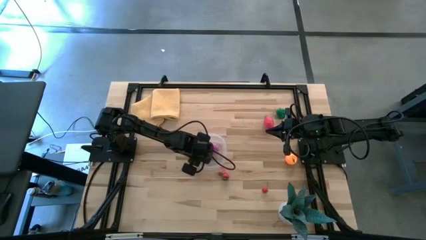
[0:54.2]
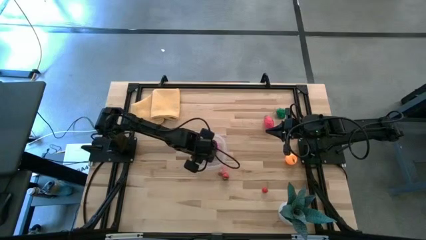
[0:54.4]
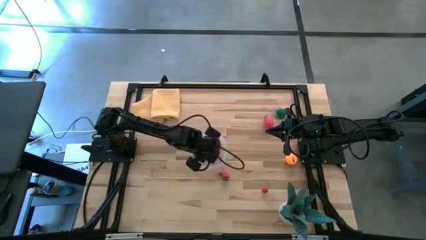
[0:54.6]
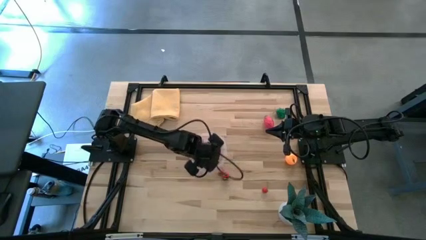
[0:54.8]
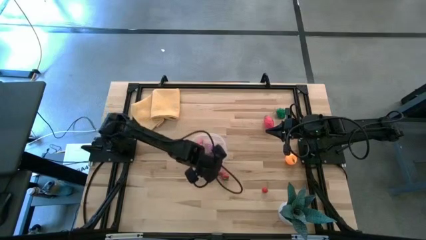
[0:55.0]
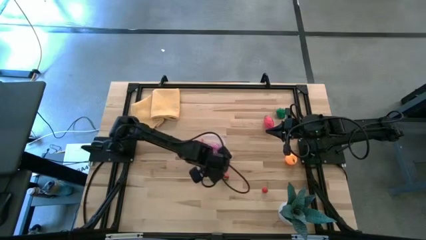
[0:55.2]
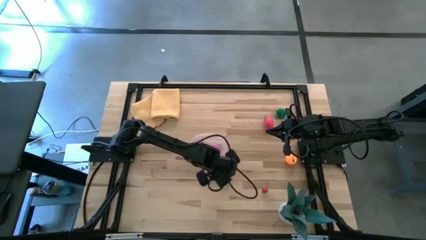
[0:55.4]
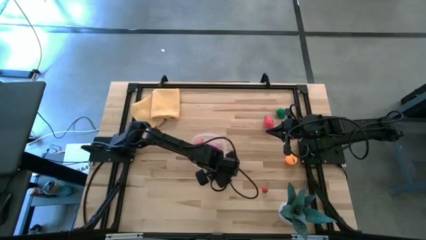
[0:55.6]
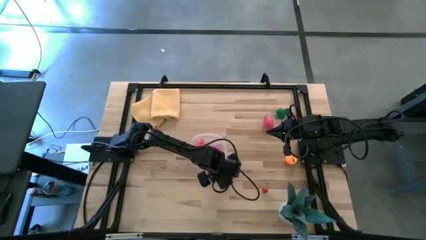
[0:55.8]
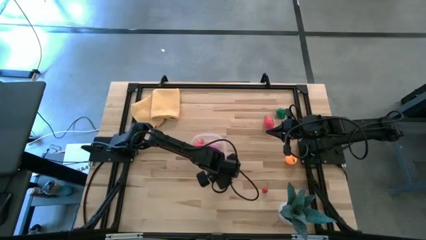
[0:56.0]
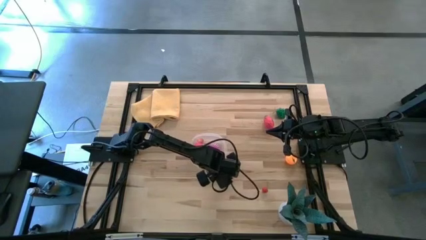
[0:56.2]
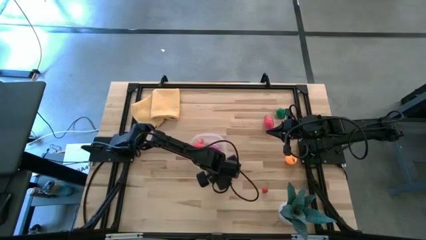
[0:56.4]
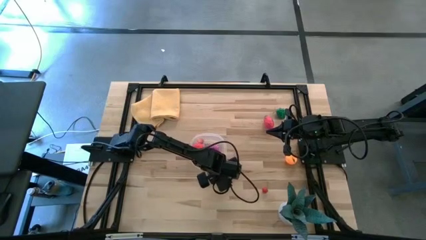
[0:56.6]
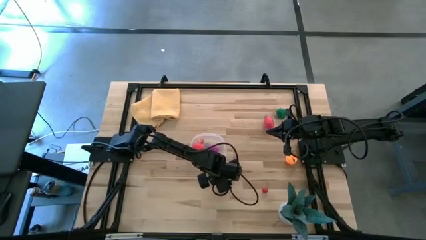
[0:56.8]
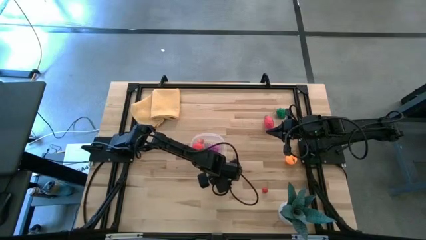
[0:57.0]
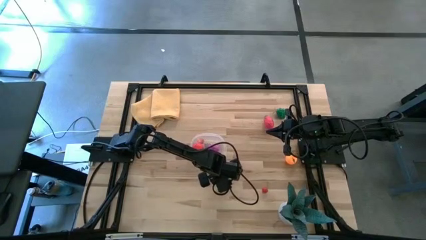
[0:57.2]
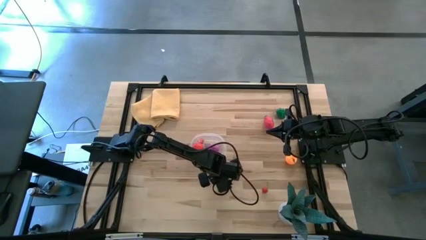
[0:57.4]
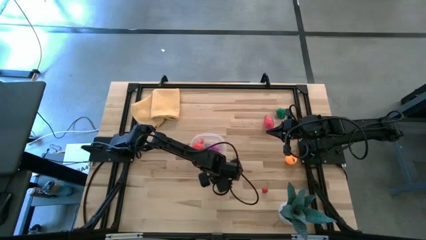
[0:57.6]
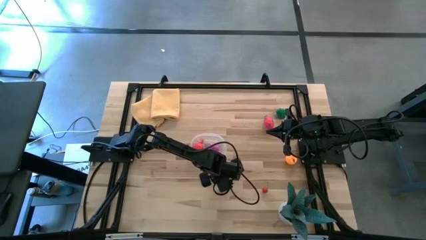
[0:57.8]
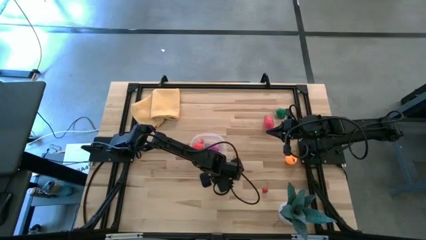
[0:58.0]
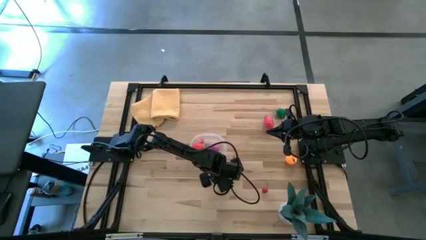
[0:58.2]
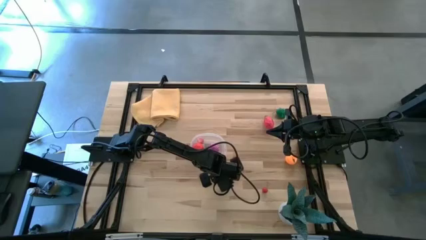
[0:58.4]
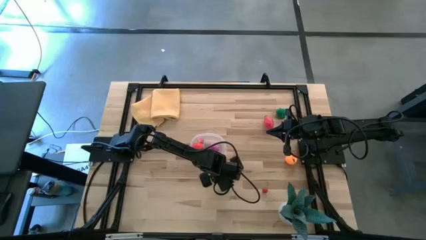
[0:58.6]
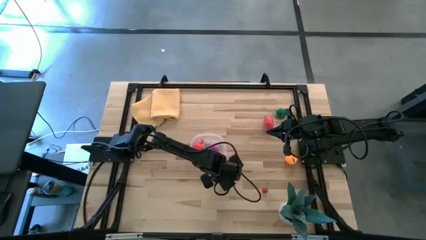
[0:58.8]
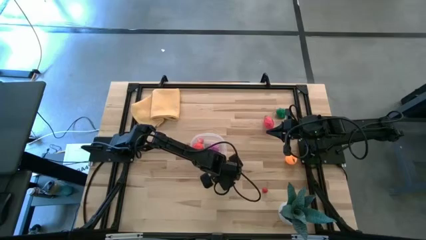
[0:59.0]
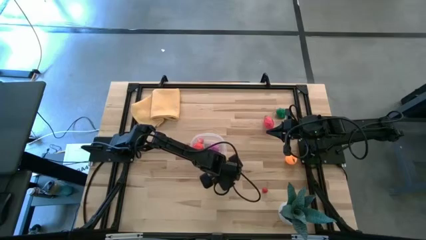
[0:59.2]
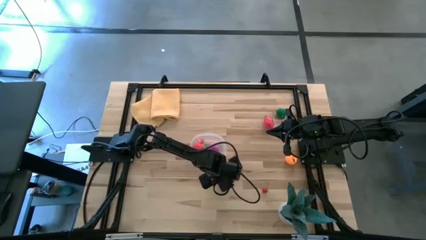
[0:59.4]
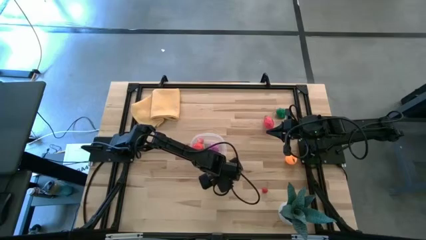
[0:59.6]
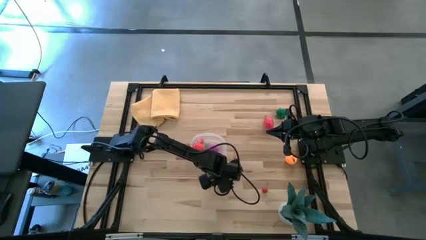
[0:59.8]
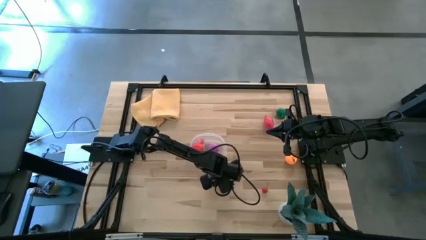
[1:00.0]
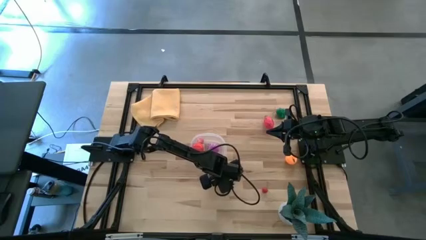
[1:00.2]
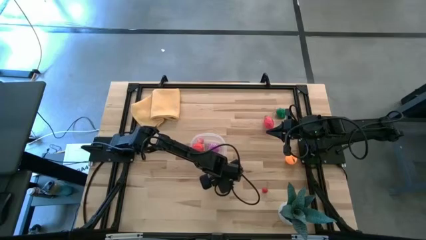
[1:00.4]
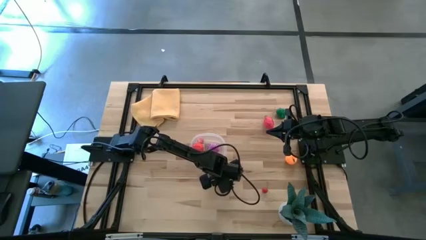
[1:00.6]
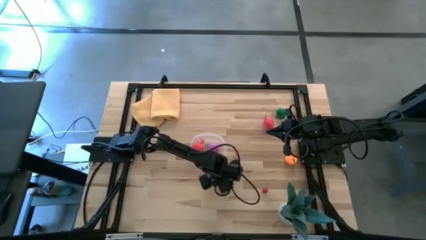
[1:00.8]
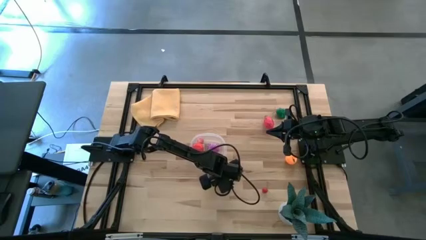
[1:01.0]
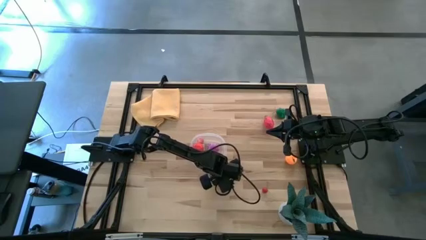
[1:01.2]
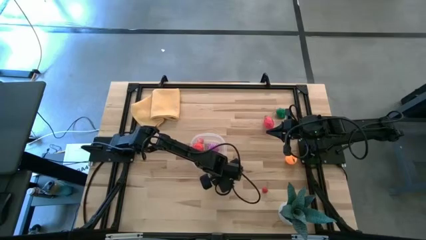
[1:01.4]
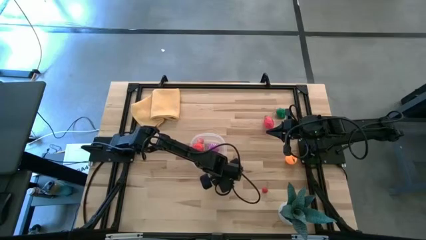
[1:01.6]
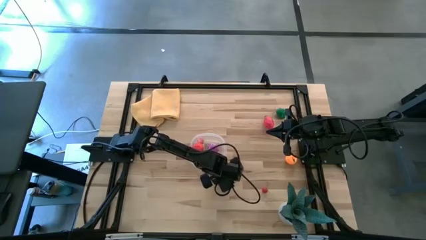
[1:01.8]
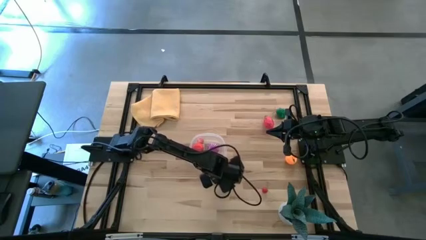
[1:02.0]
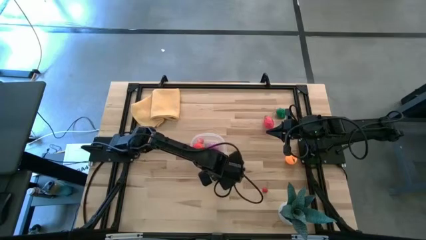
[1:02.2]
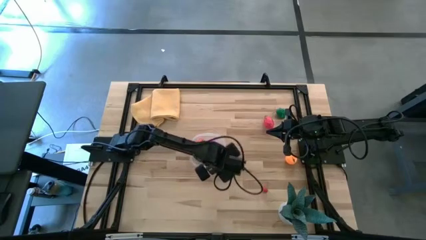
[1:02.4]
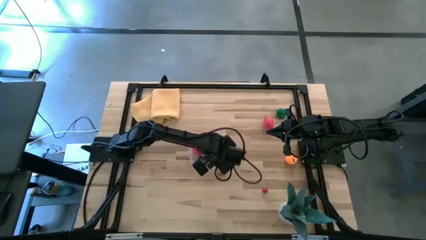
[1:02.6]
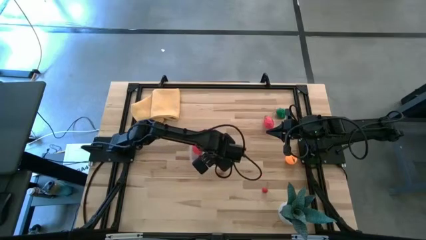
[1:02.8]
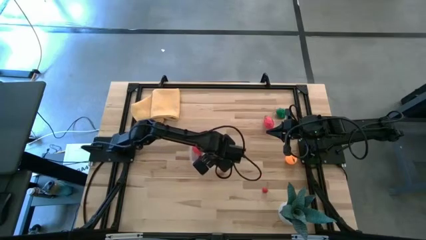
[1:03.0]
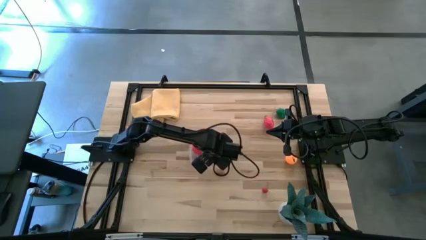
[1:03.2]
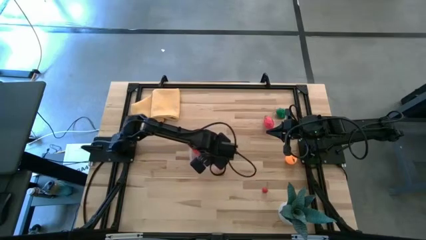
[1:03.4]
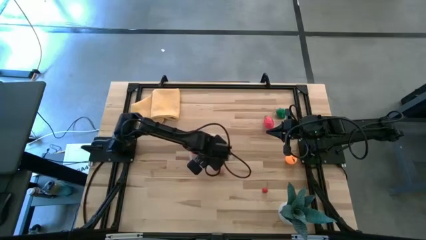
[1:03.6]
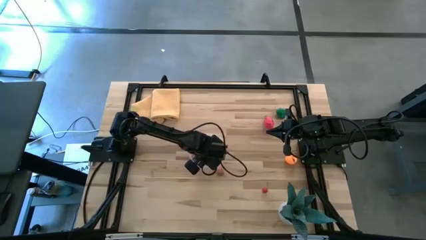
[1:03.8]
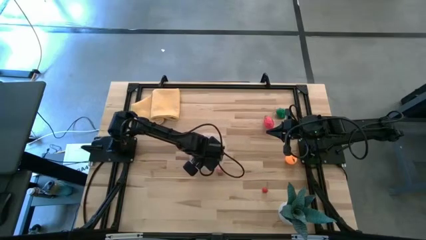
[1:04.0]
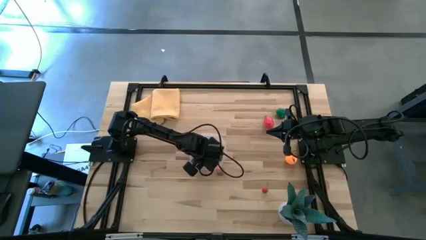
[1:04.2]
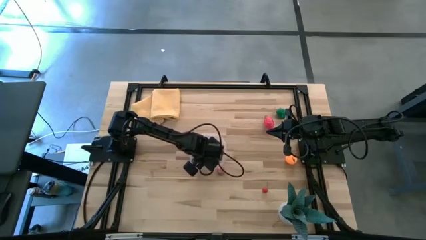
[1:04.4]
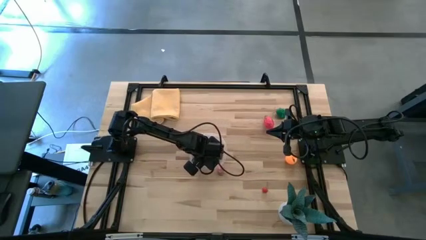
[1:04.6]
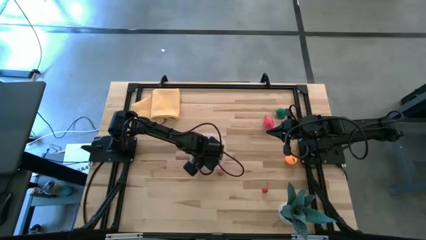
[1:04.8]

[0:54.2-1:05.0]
Task: Pick and placing Produce into tupperware
Put the strawberry into the transparent bin

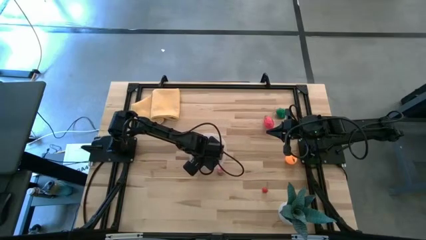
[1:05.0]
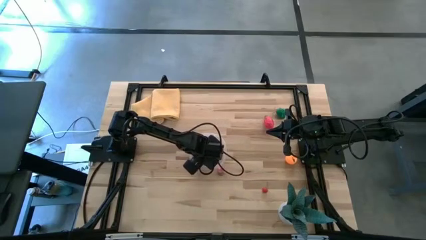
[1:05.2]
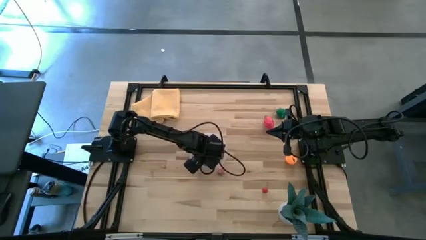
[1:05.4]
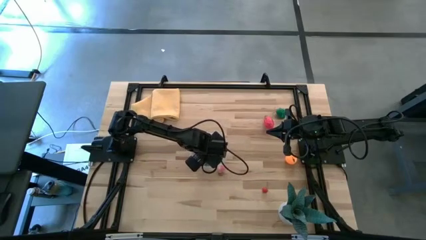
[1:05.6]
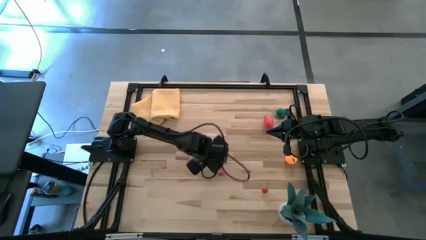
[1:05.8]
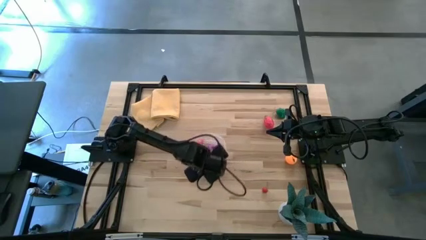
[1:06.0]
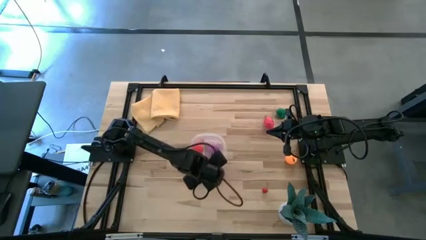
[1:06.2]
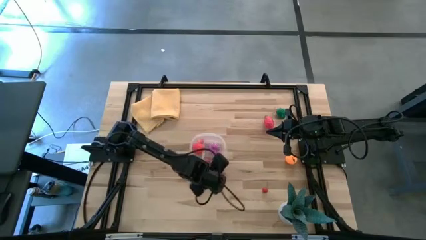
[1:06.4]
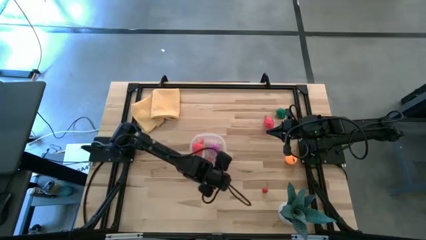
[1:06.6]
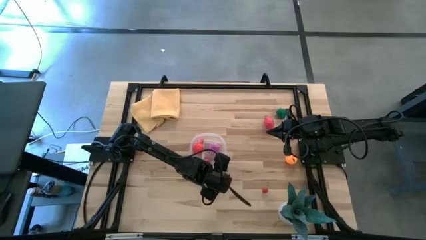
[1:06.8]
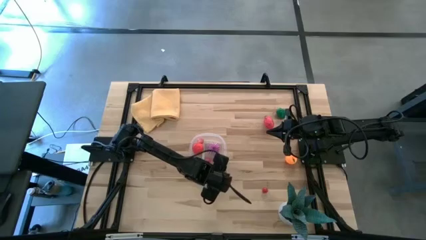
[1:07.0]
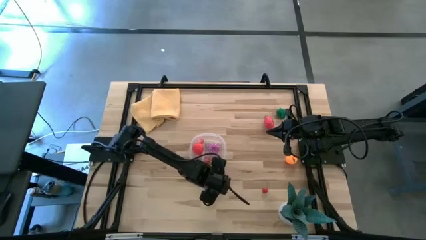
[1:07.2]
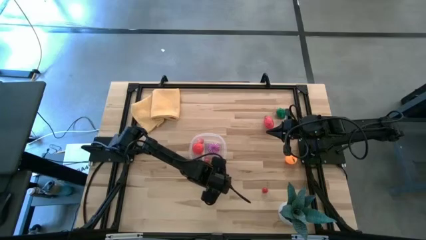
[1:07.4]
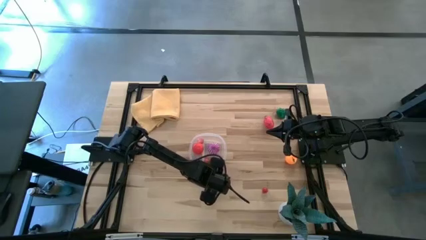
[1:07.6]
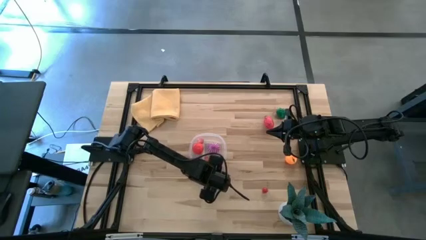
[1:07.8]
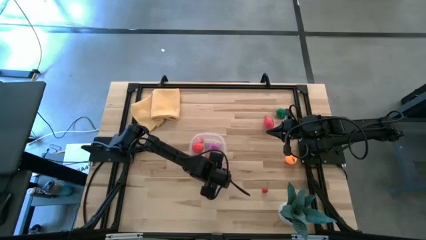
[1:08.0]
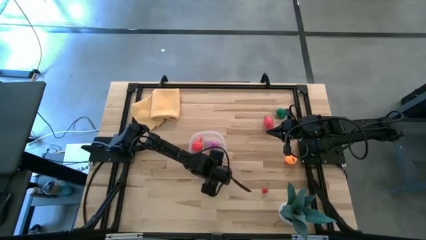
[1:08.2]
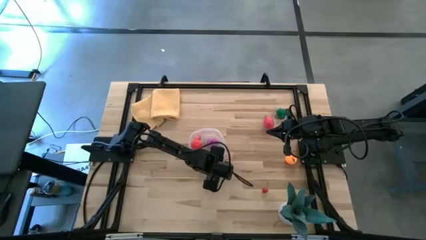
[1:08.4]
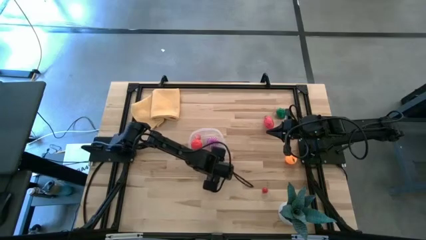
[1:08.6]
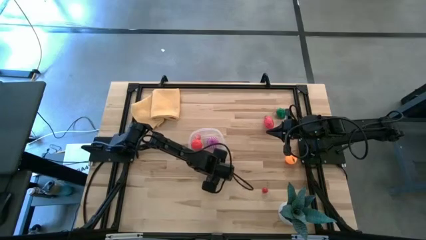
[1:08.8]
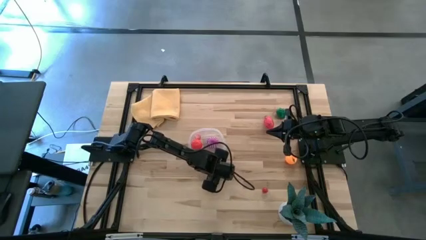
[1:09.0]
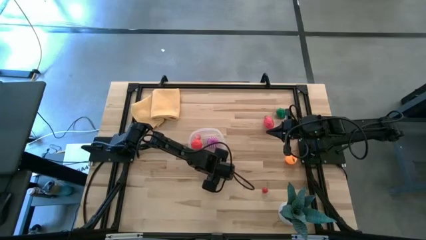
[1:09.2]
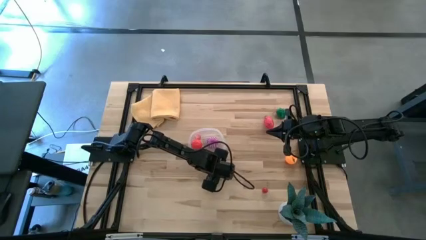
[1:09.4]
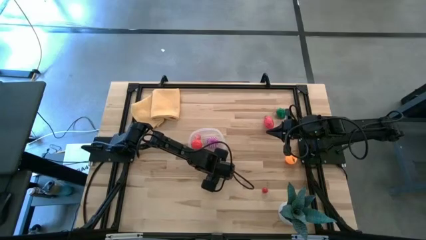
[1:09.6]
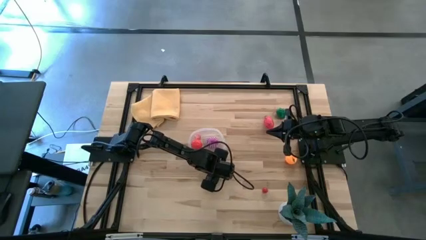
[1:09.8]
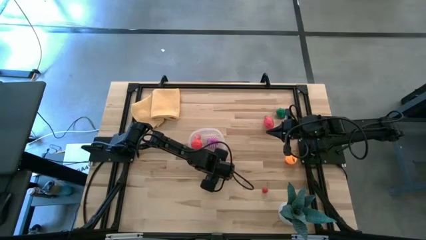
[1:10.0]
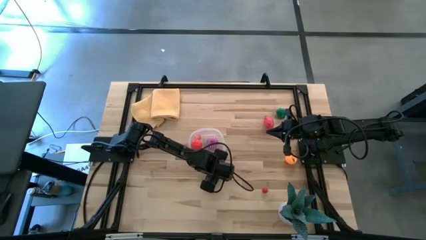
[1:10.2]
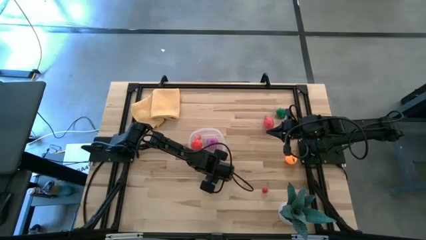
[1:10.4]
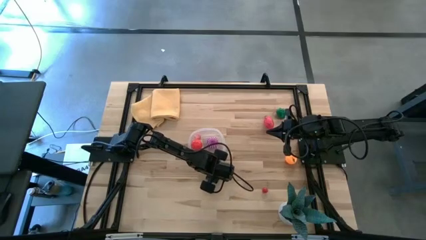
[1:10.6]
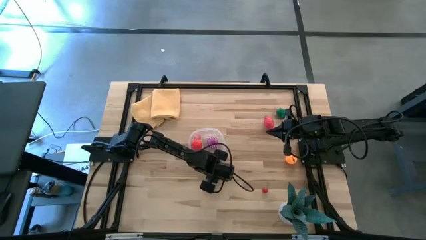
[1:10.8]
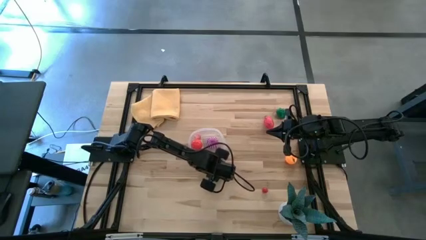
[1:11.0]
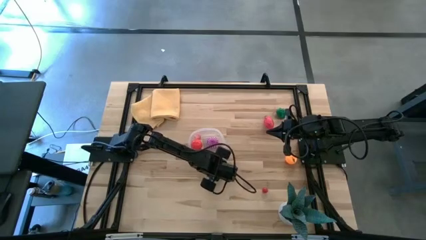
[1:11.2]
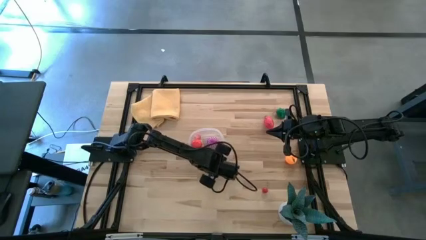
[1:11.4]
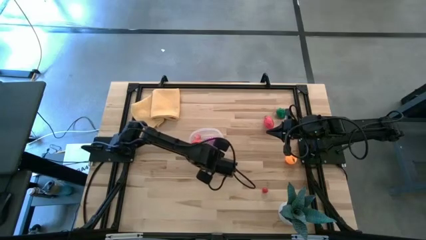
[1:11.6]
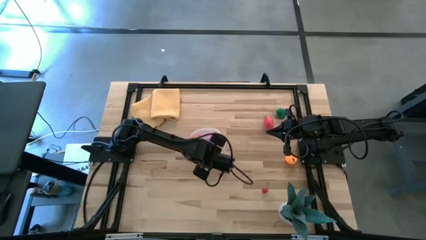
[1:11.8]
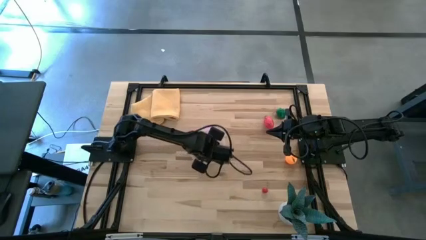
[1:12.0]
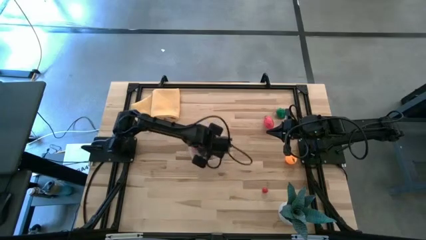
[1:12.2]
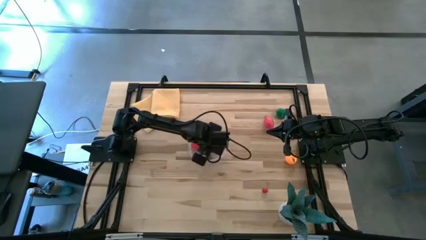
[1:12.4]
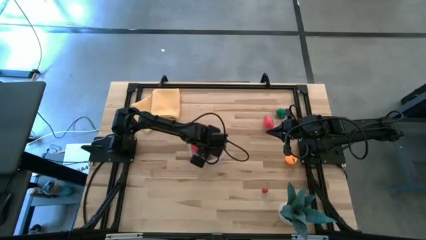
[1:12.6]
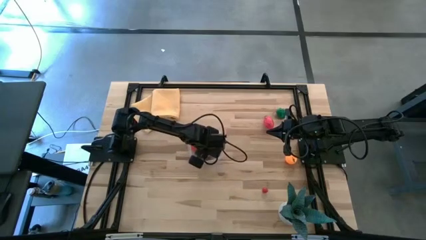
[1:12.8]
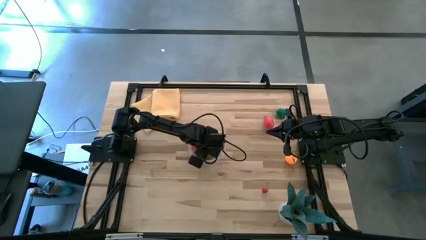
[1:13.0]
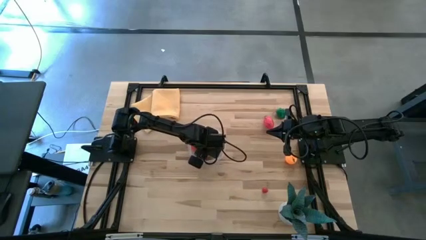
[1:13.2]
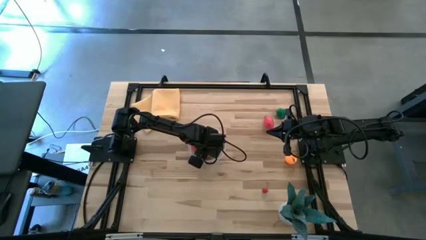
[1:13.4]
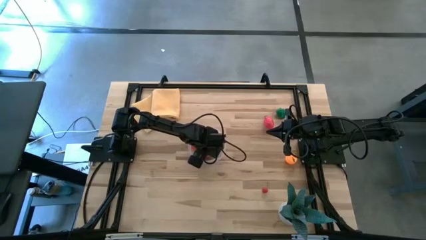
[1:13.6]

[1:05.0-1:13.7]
Put the peach into the transparent bin
